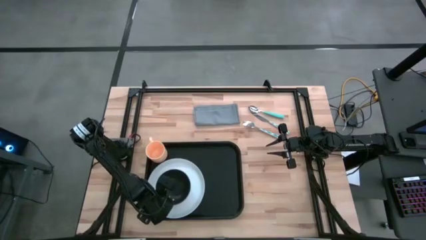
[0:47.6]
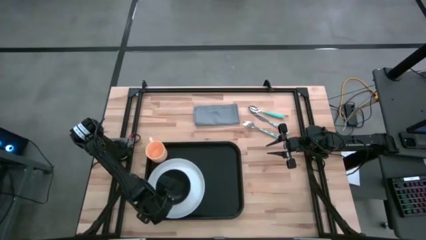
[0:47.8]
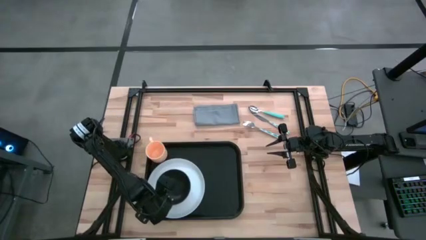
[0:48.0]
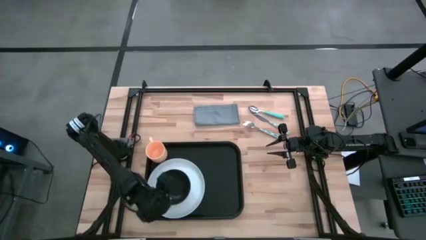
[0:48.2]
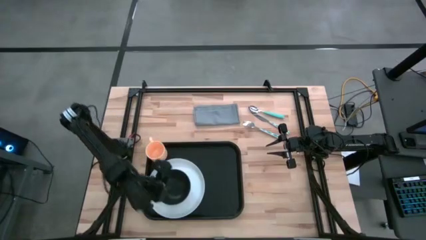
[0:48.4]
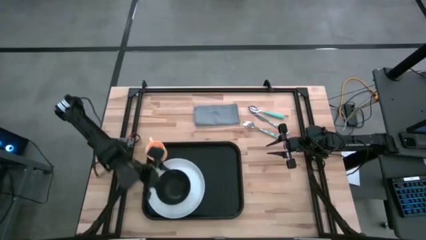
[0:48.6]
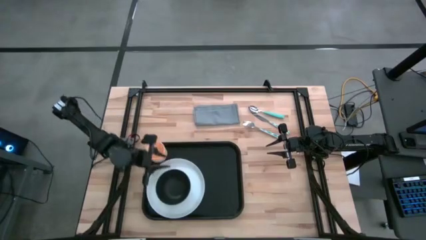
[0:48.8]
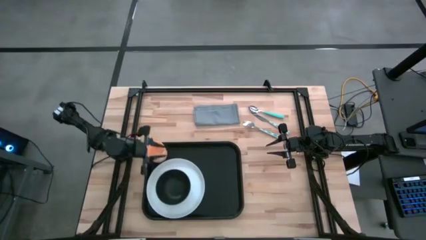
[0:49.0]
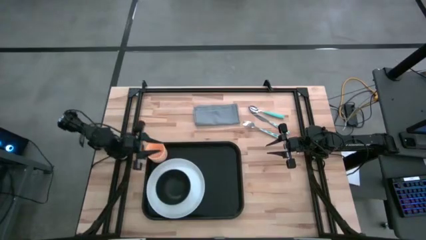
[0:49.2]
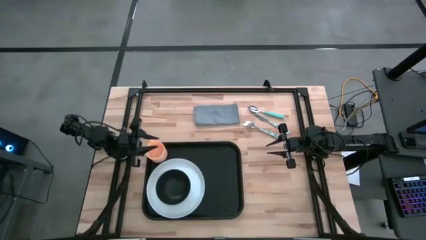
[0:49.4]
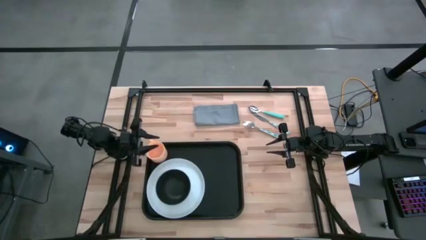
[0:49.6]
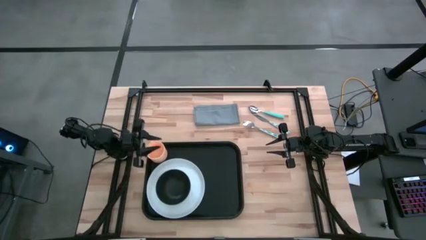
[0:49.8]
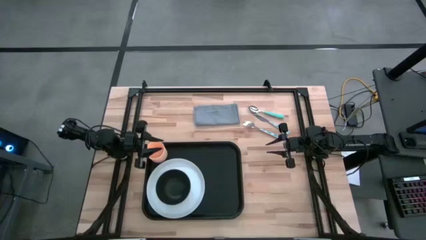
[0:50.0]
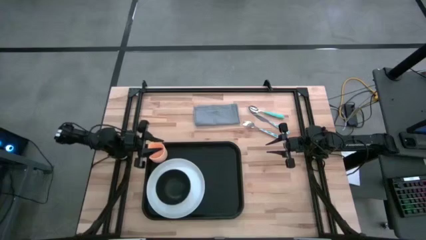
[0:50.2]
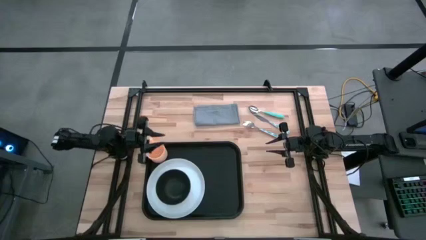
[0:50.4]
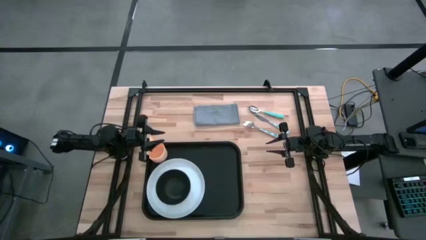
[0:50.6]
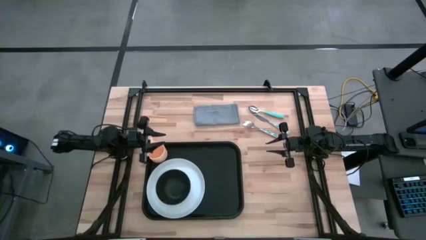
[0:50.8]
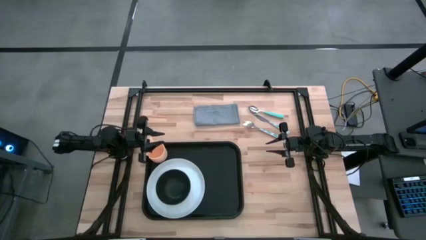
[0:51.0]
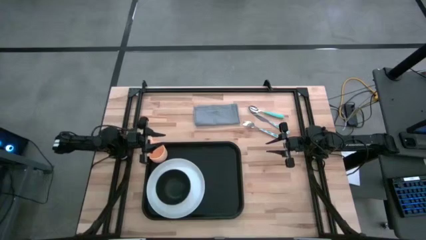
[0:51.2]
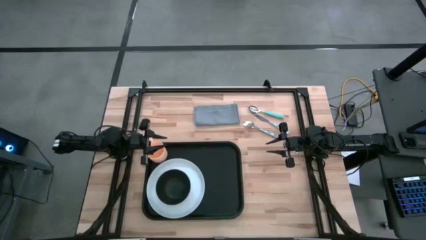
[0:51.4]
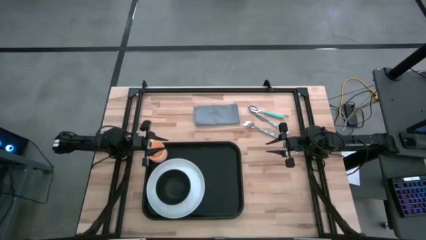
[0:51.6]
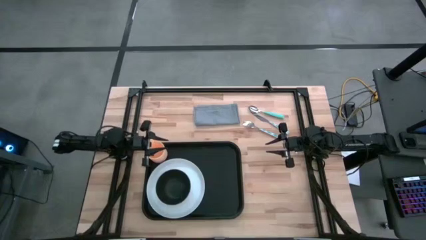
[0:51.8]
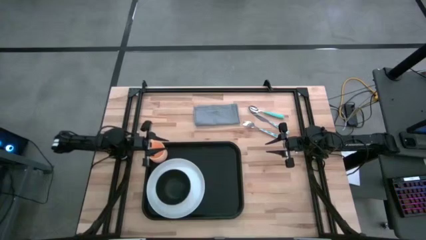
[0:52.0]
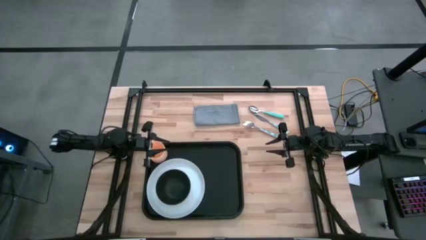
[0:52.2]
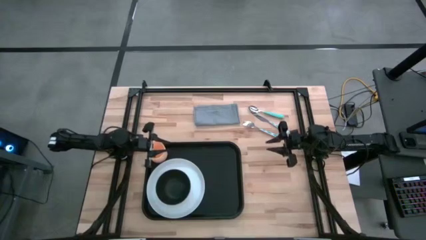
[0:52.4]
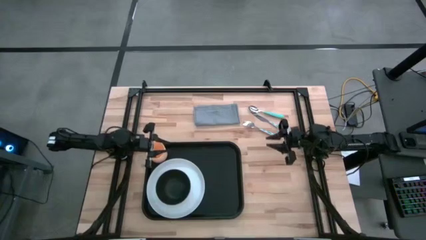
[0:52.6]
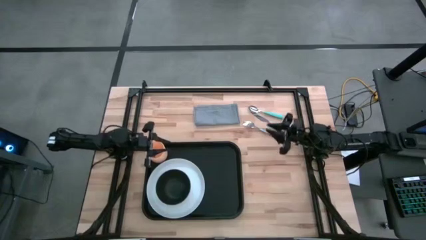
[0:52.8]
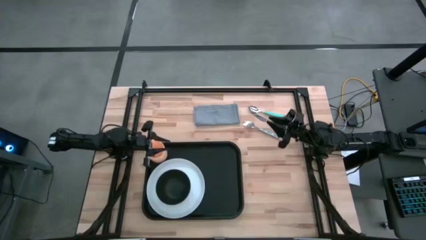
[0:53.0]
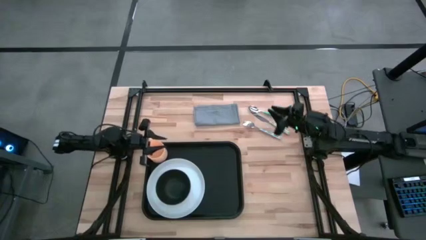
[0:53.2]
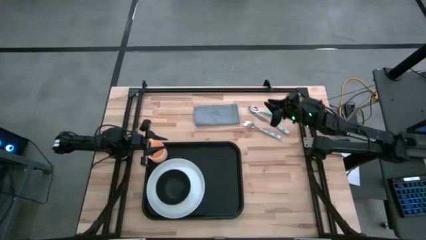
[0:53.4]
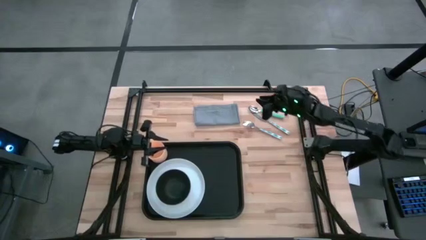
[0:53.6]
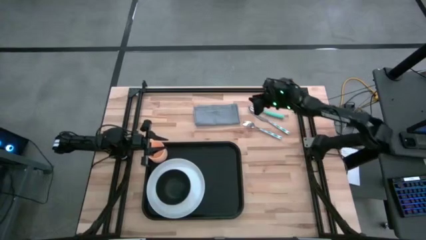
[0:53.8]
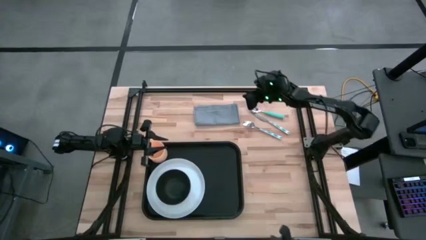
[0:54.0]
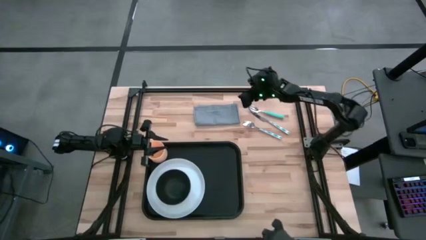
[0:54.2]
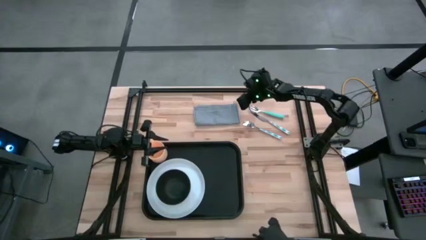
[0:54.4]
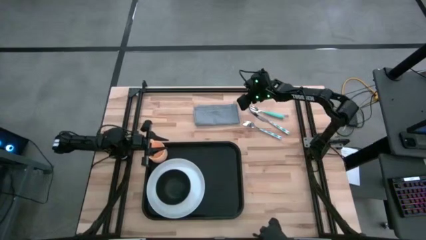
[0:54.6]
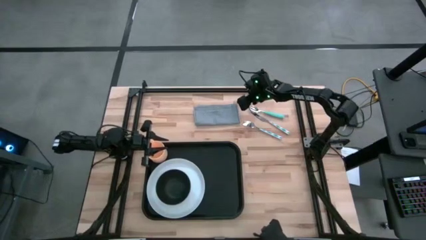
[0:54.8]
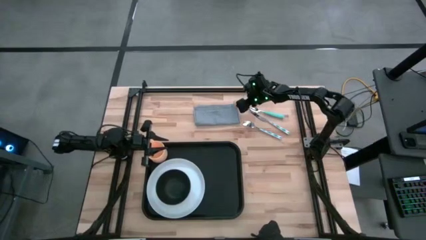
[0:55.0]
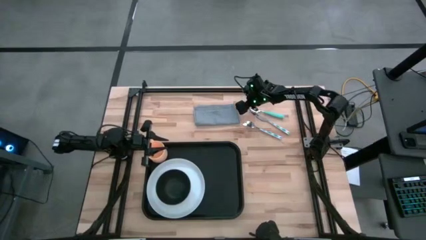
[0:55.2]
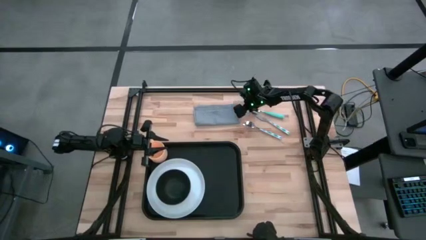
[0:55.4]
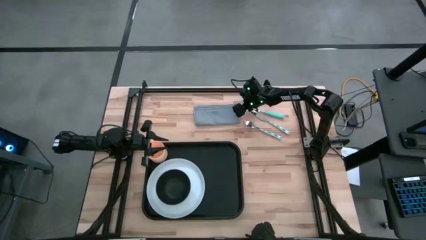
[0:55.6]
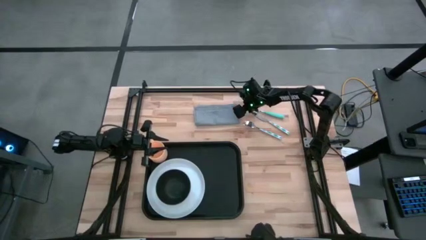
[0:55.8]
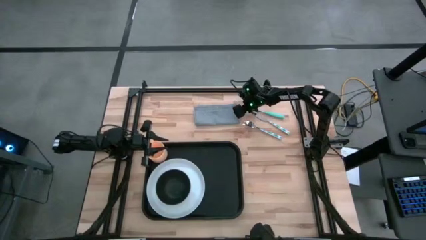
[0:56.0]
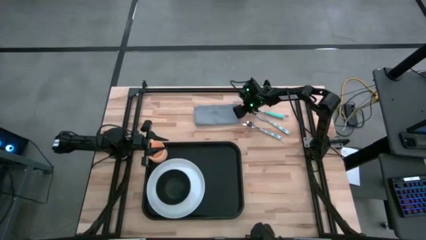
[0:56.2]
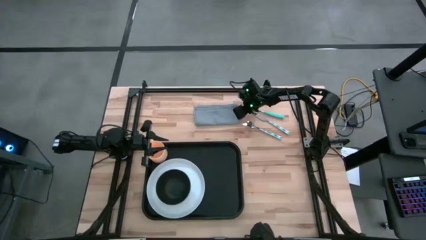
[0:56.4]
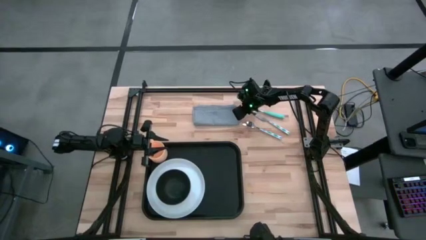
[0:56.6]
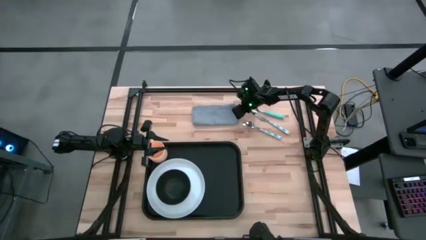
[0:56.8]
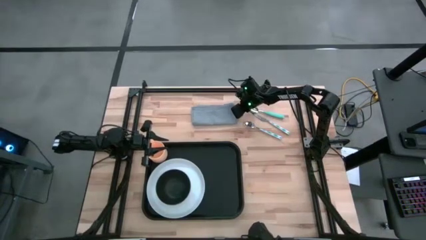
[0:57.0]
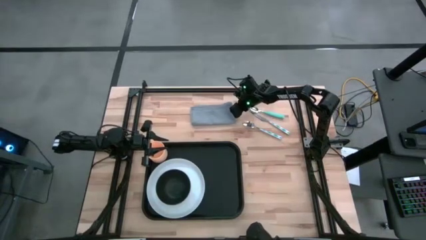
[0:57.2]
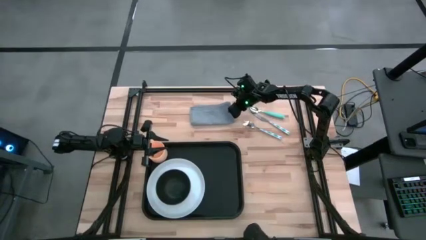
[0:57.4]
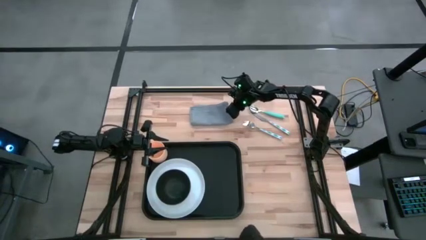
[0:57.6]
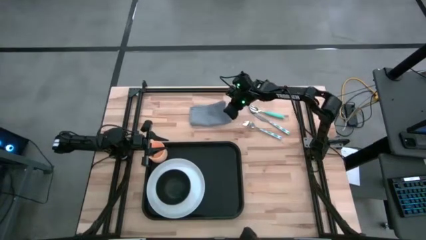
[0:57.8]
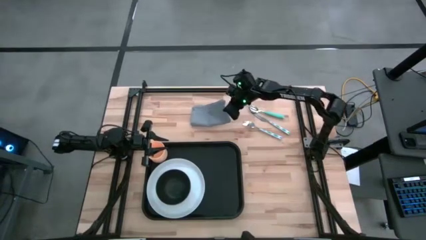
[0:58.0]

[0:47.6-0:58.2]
Task: Set up tray
Put the gray napkin on the black tray to the right of the white plate
